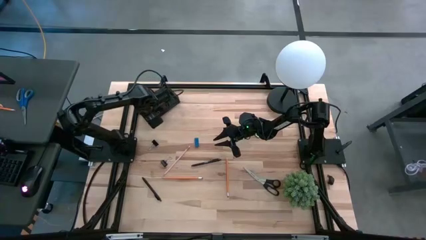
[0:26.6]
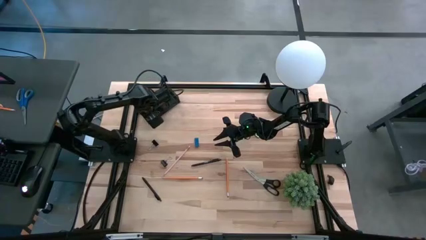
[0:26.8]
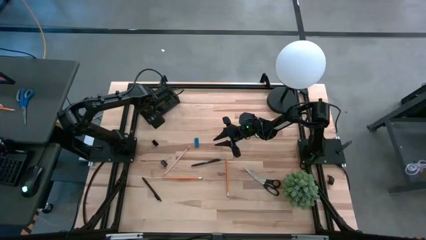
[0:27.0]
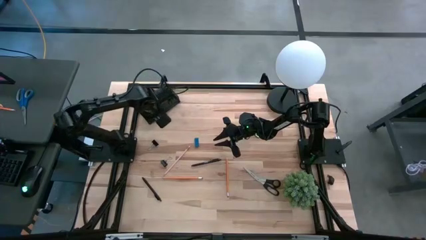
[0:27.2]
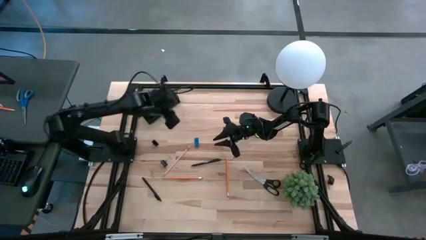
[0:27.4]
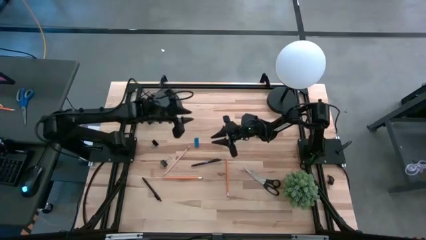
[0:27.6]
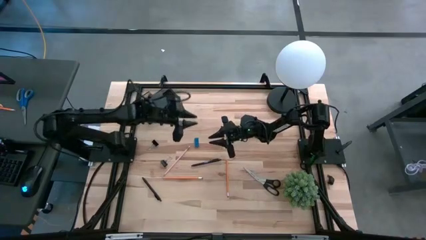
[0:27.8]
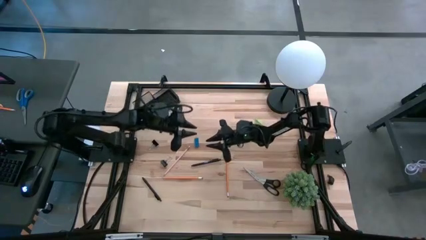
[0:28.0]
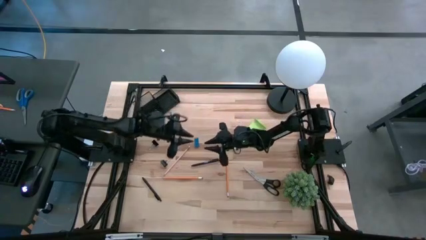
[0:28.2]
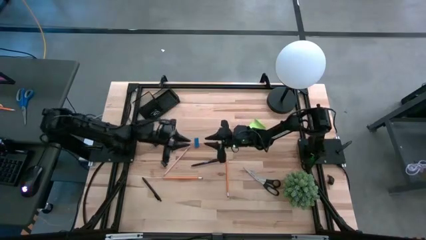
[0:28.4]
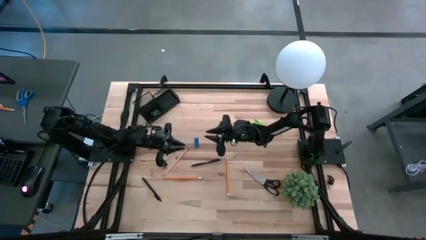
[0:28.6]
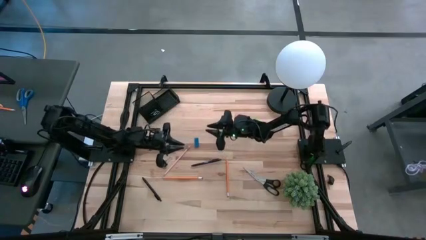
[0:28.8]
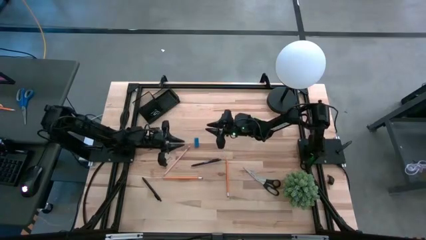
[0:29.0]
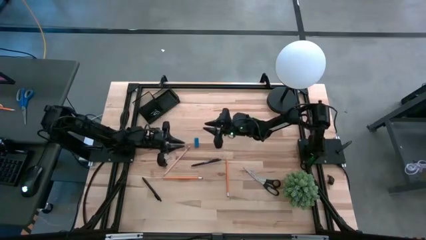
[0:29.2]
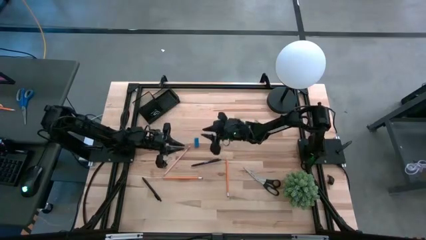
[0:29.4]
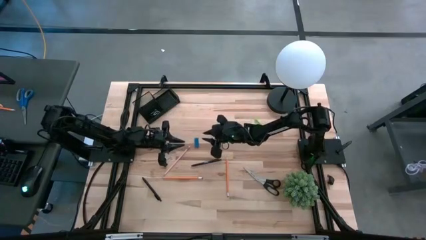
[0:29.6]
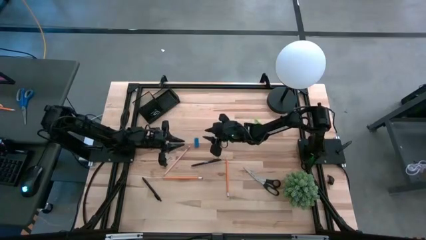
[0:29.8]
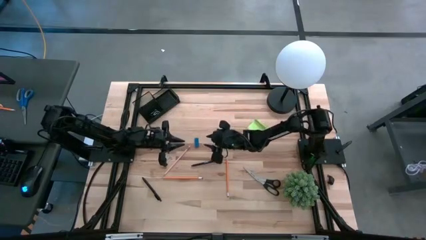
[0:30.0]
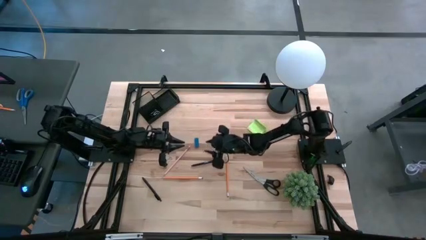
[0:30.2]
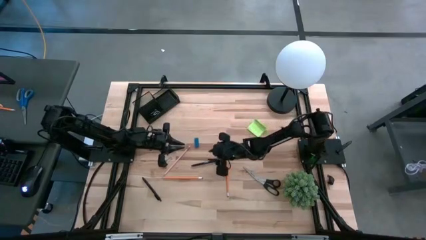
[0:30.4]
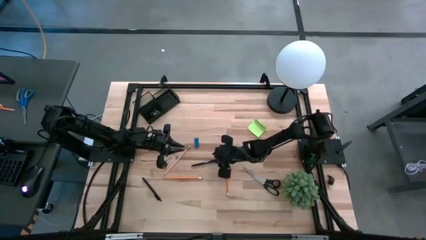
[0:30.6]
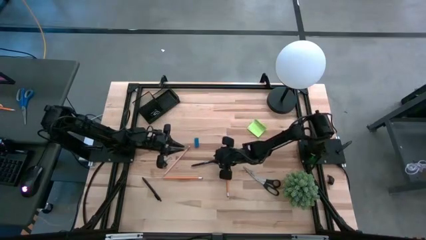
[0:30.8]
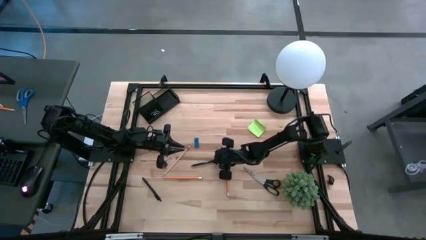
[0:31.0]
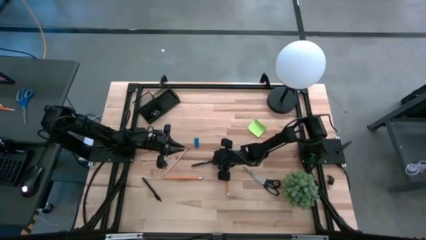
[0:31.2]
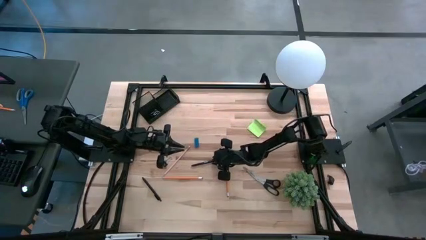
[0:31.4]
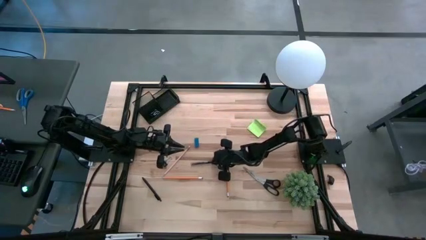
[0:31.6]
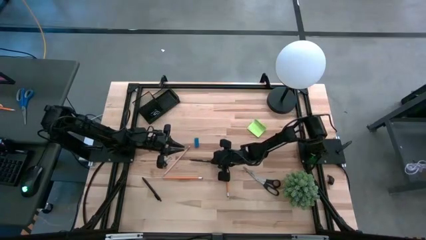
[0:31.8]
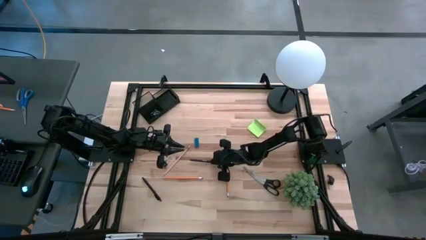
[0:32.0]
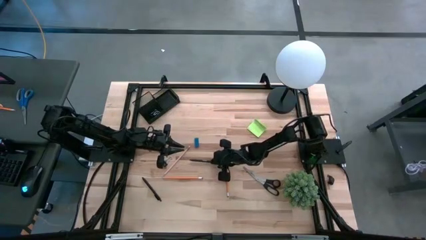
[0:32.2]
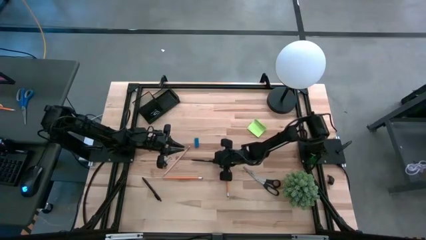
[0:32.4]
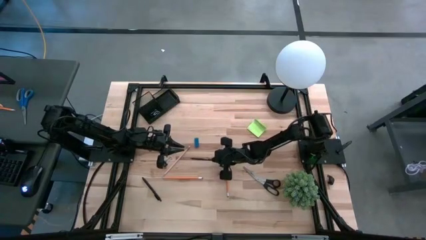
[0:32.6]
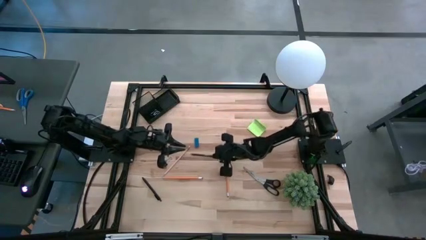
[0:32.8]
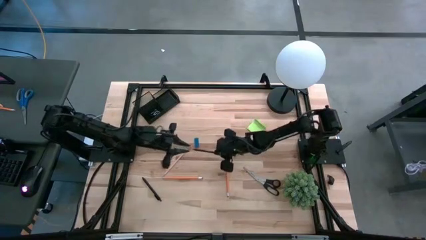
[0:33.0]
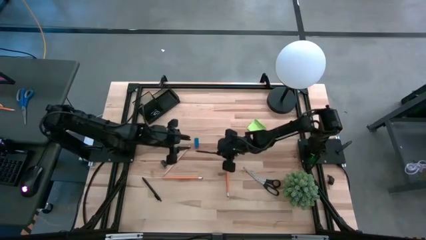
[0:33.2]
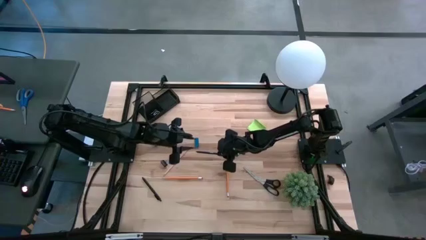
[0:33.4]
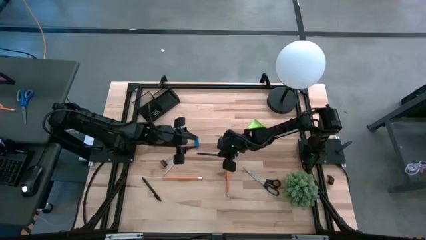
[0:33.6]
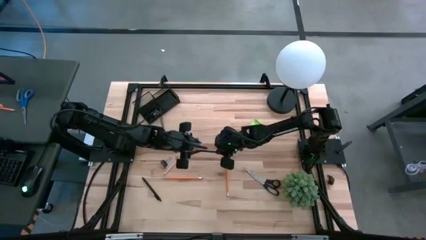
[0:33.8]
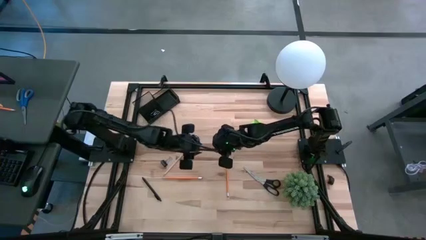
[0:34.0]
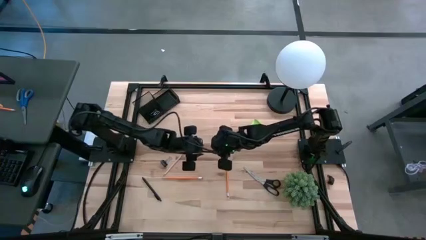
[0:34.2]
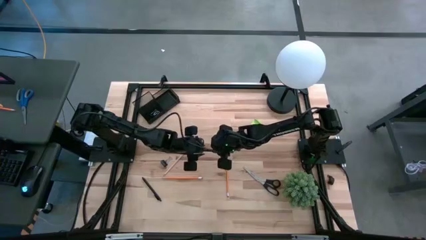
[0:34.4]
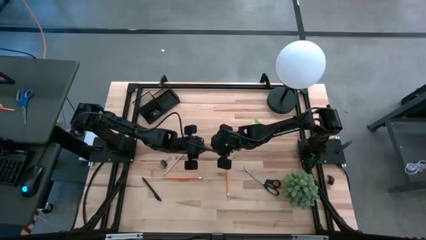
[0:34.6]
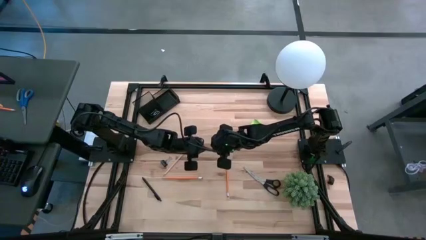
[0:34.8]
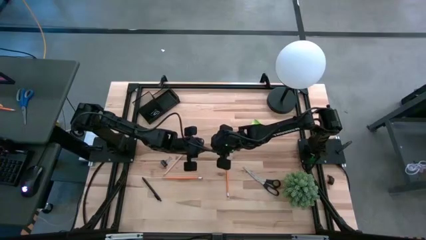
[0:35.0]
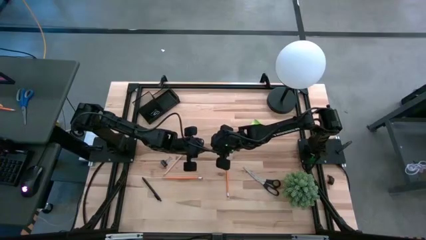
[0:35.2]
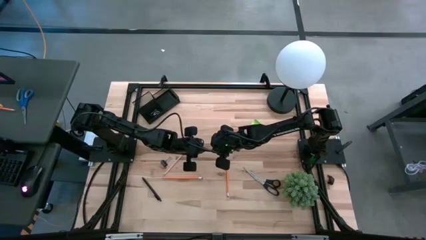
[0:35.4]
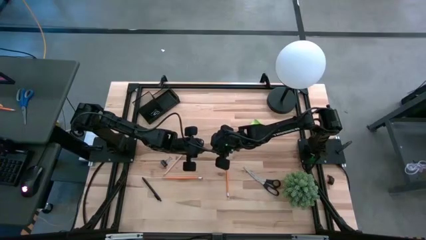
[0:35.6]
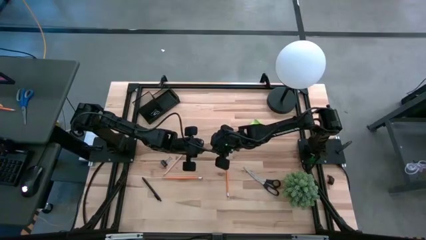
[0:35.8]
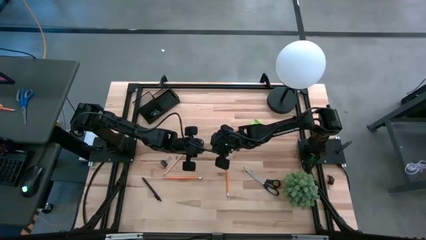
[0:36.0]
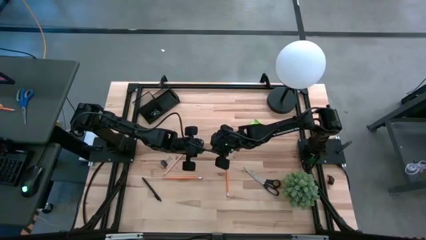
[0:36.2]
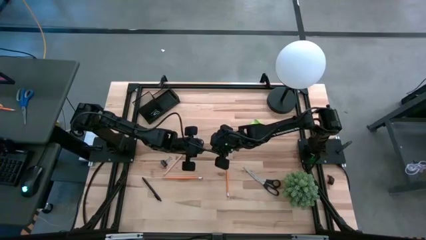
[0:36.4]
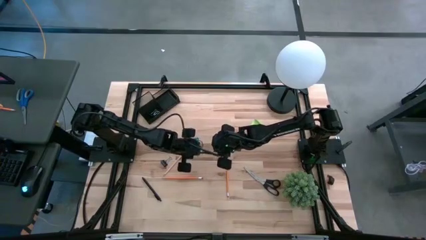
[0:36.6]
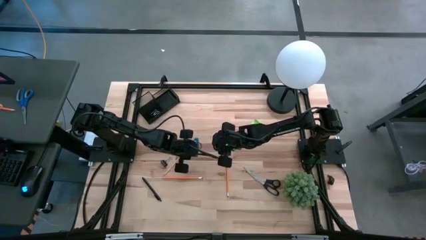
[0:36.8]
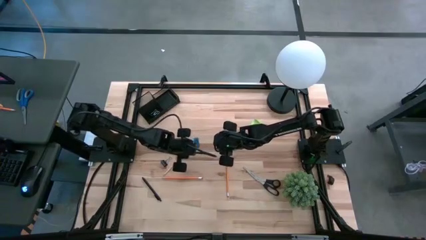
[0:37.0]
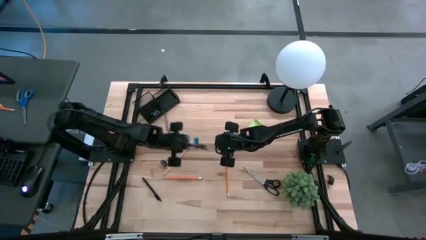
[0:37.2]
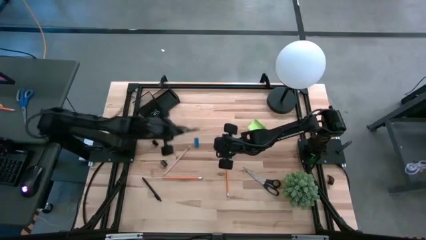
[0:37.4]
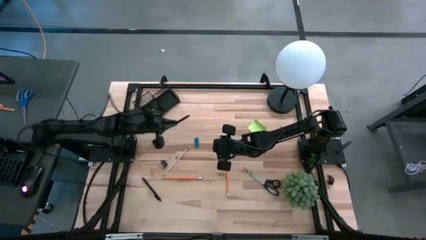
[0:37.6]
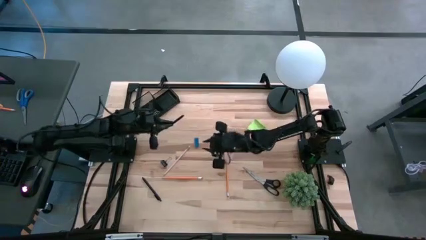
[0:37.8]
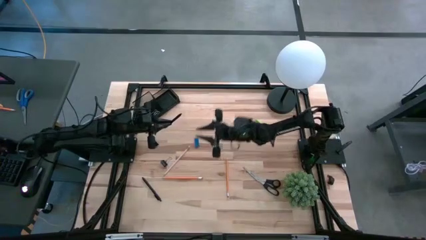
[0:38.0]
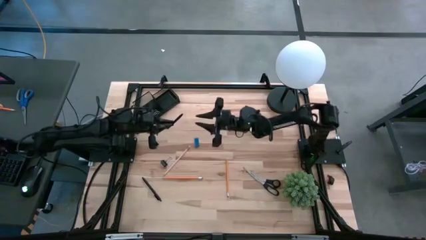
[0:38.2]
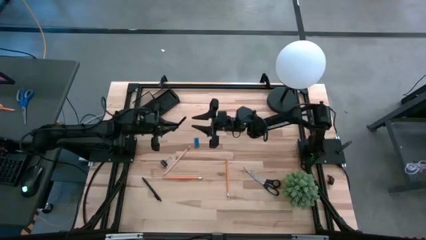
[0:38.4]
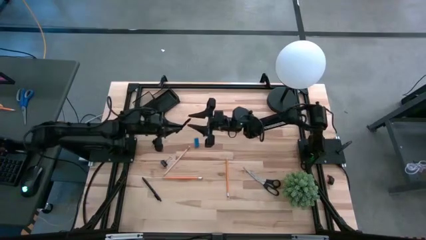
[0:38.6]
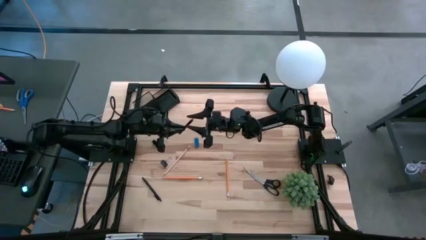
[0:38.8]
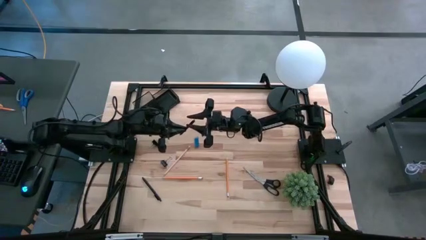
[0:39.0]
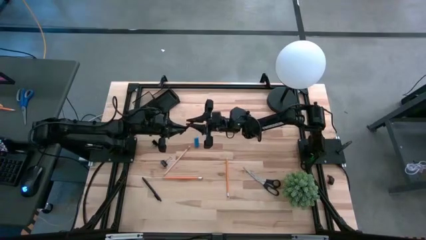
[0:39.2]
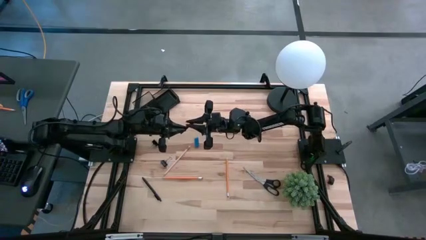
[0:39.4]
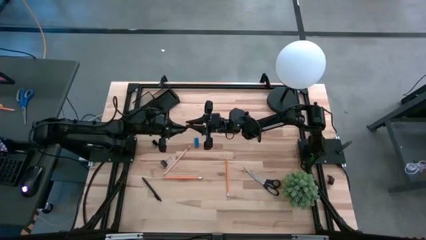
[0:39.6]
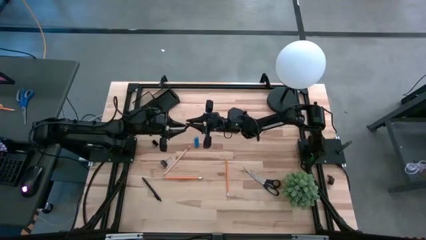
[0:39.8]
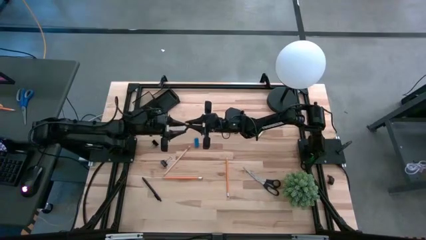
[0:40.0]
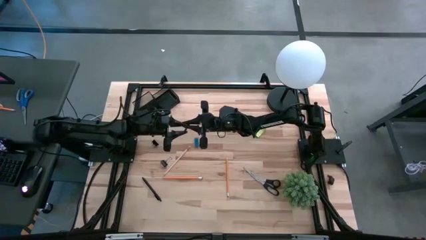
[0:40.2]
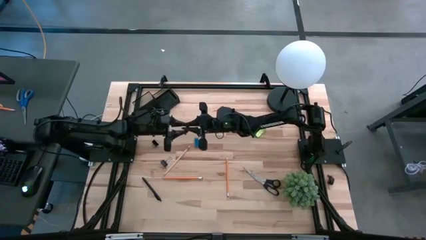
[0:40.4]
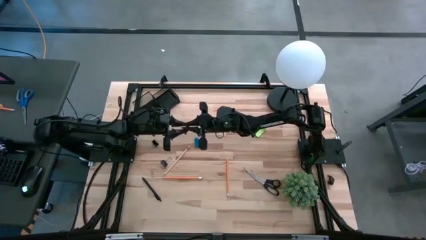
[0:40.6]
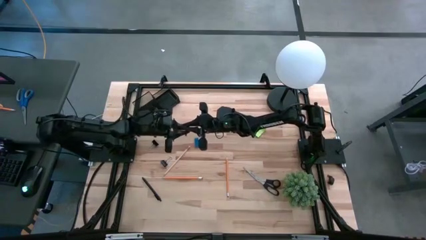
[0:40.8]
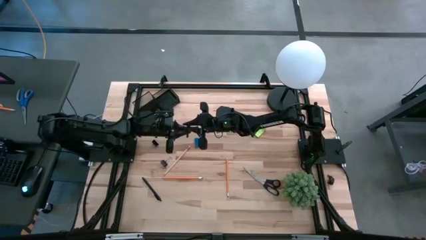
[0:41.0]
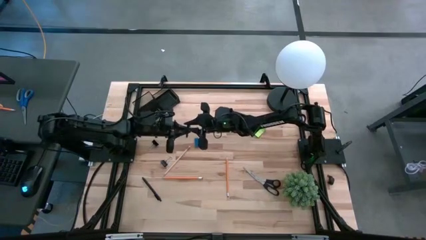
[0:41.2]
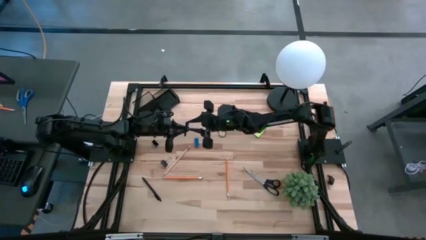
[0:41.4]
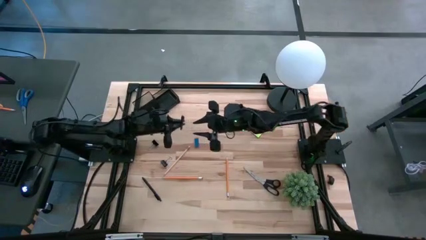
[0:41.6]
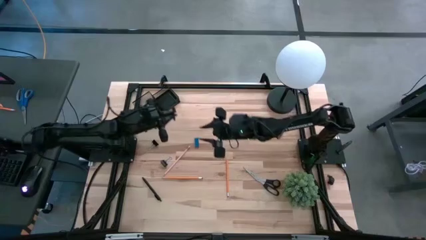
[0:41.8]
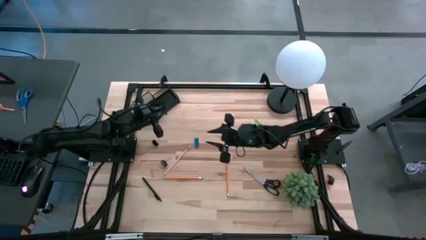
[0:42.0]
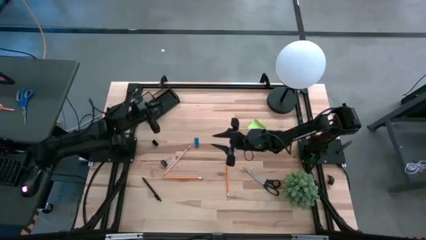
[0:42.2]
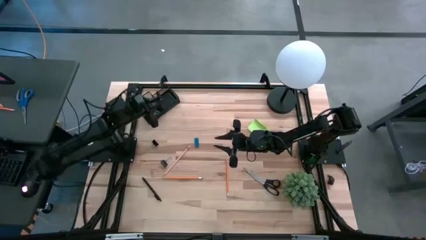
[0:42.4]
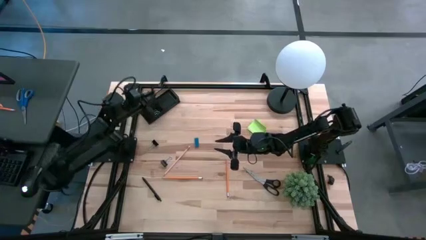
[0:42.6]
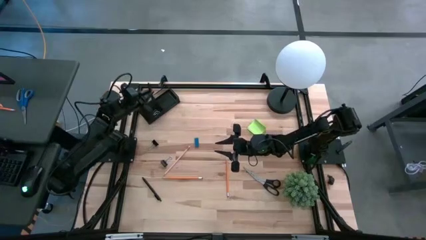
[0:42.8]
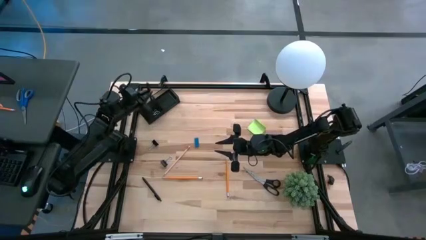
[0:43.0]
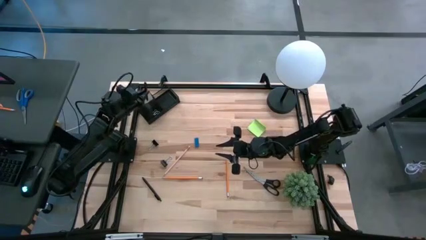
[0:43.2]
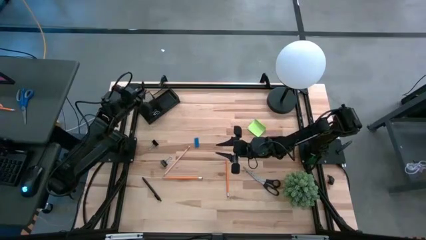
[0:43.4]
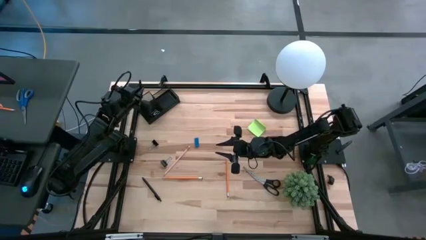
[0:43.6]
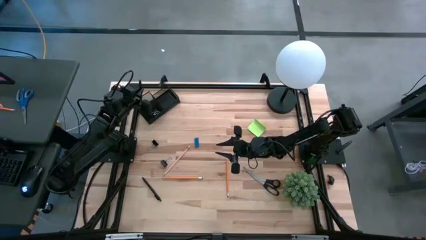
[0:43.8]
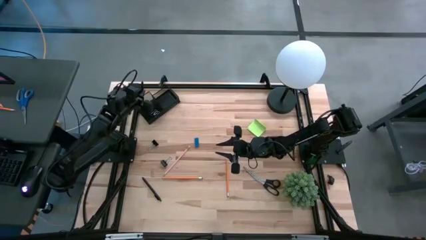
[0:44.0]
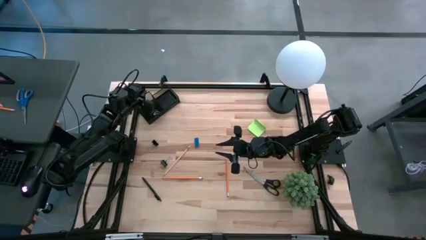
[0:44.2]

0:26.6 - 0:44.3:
Task: Pick and place office supplies into organizer
Put the black pen into the top left section of the desk organizer
